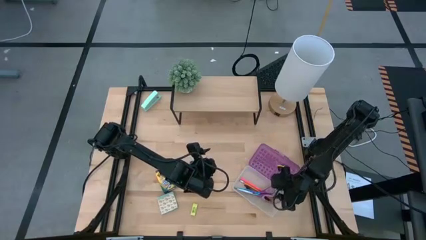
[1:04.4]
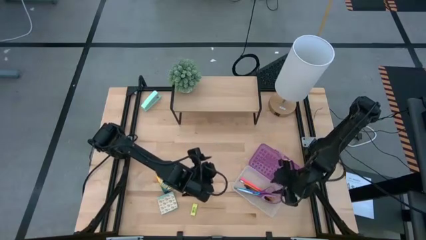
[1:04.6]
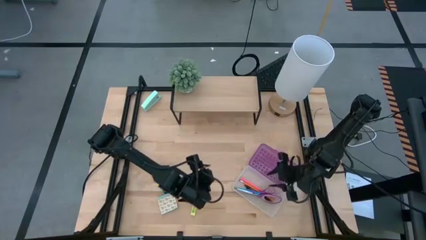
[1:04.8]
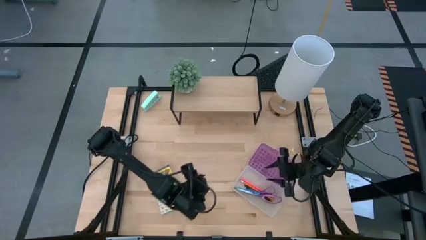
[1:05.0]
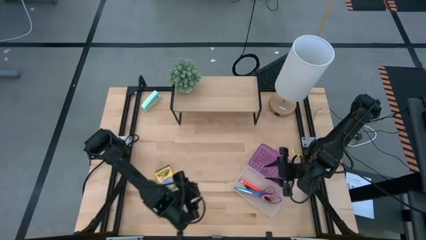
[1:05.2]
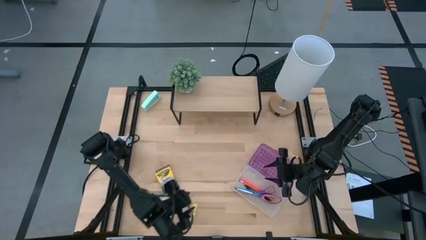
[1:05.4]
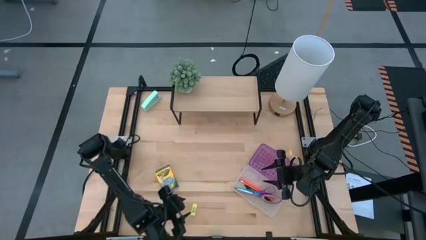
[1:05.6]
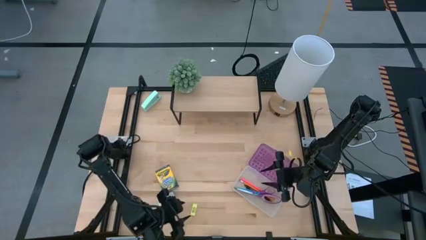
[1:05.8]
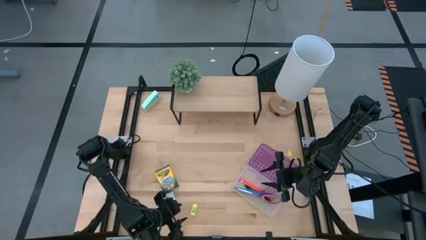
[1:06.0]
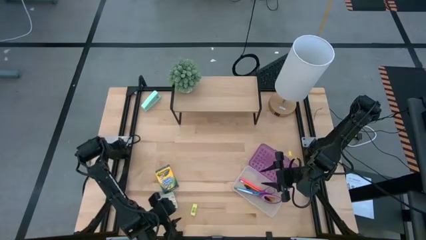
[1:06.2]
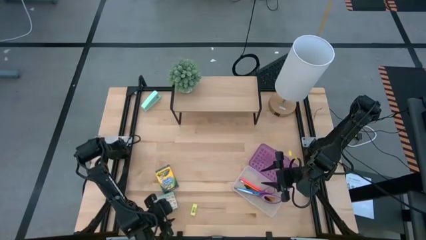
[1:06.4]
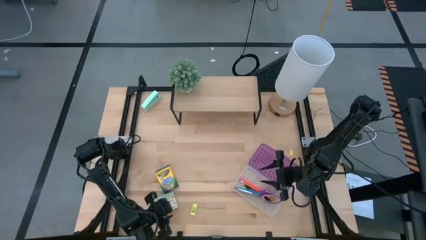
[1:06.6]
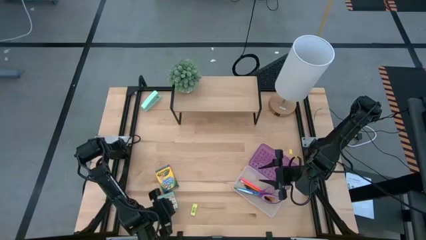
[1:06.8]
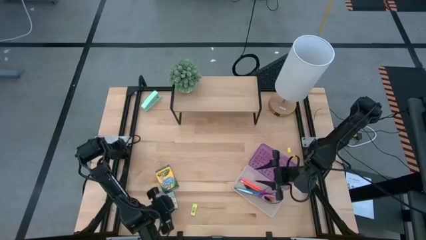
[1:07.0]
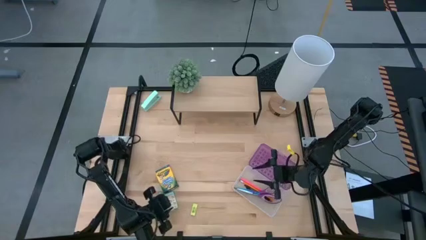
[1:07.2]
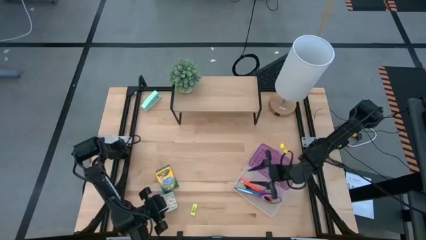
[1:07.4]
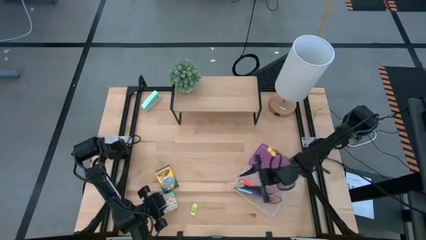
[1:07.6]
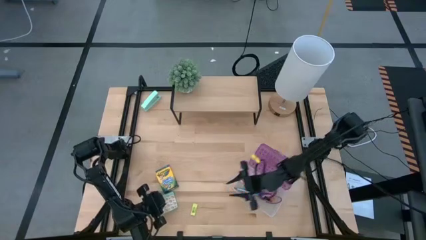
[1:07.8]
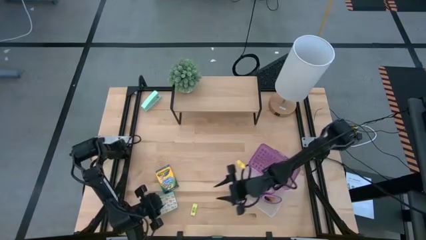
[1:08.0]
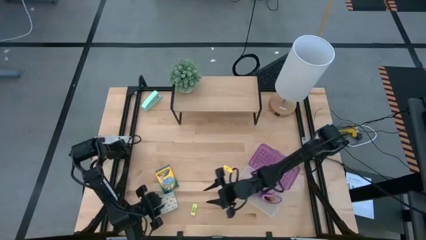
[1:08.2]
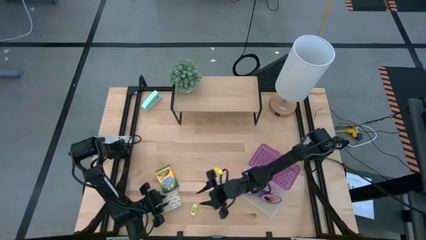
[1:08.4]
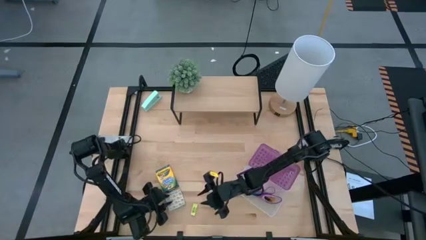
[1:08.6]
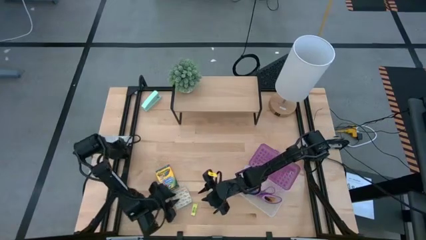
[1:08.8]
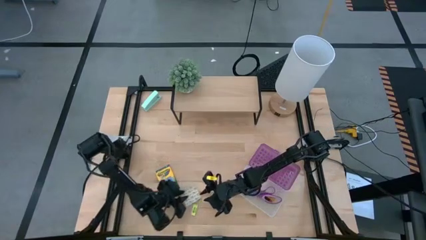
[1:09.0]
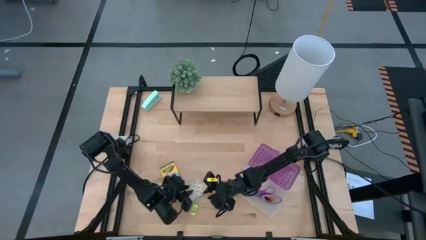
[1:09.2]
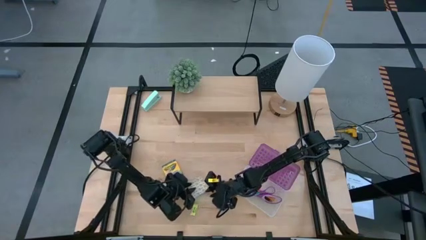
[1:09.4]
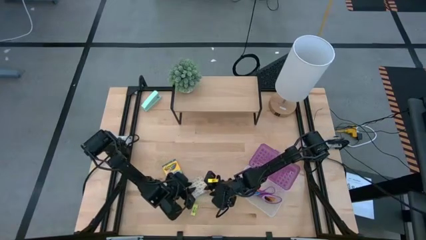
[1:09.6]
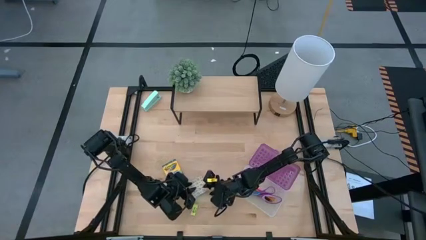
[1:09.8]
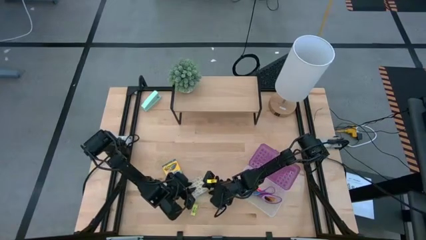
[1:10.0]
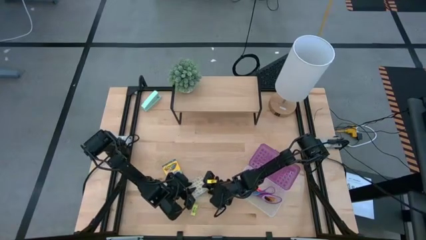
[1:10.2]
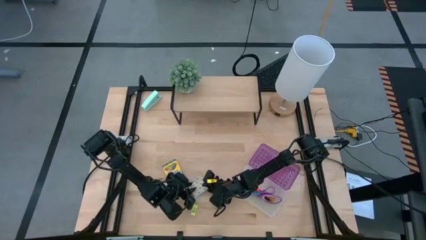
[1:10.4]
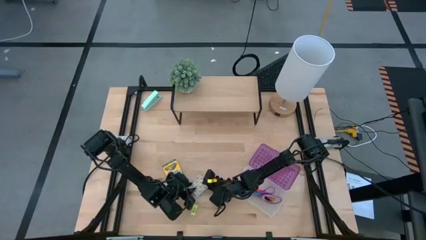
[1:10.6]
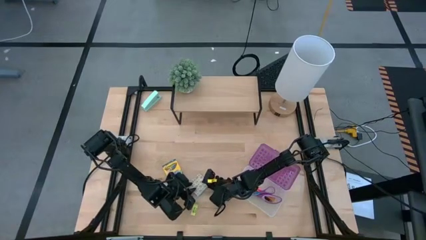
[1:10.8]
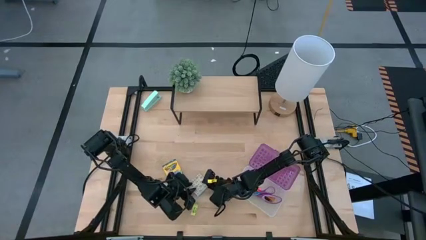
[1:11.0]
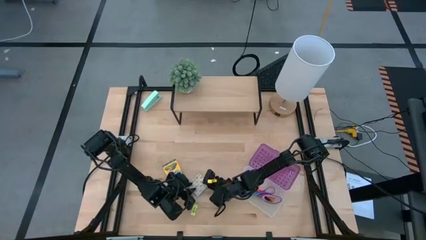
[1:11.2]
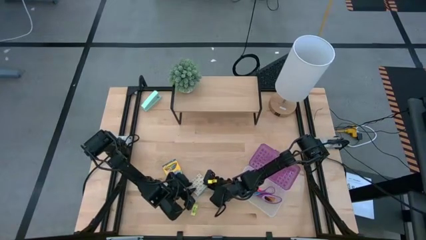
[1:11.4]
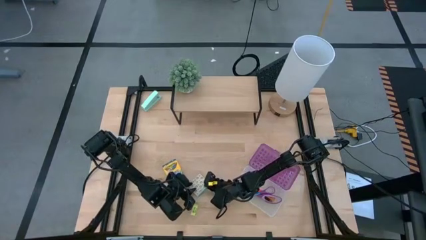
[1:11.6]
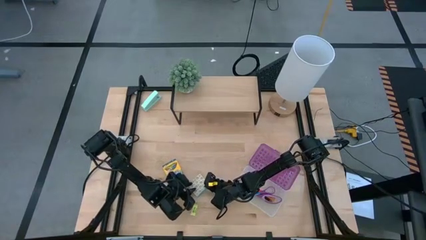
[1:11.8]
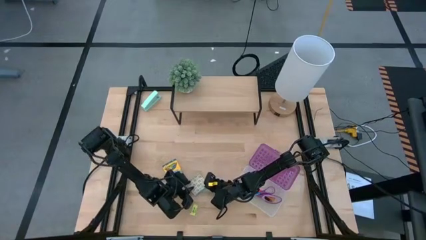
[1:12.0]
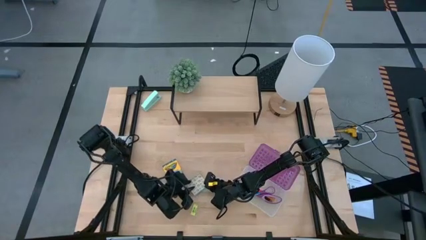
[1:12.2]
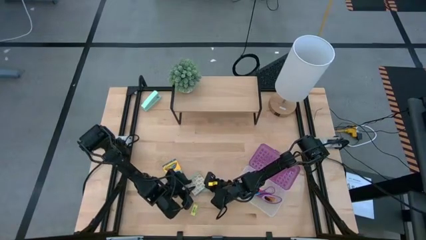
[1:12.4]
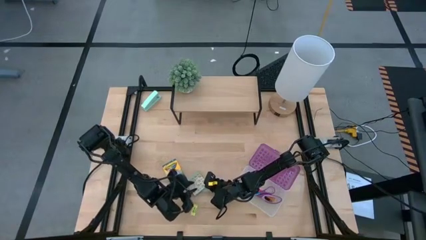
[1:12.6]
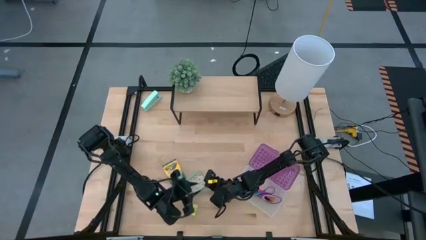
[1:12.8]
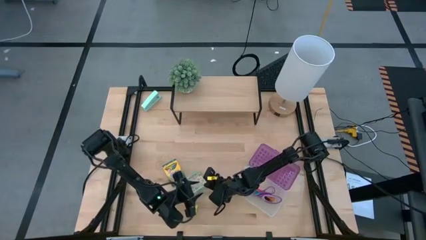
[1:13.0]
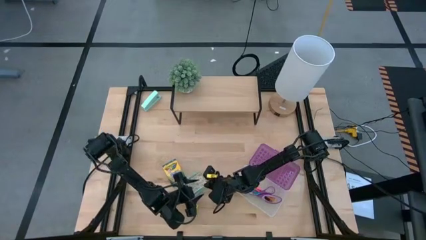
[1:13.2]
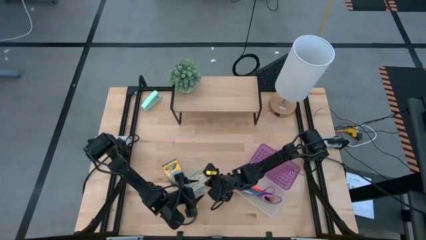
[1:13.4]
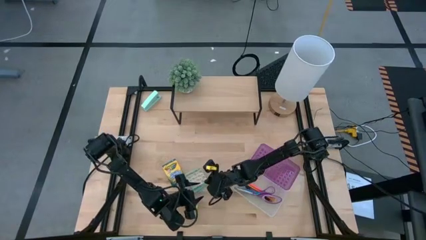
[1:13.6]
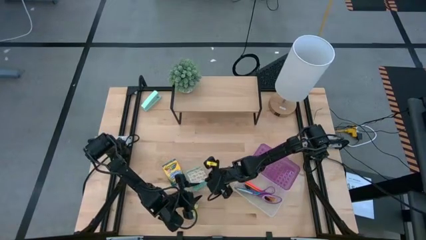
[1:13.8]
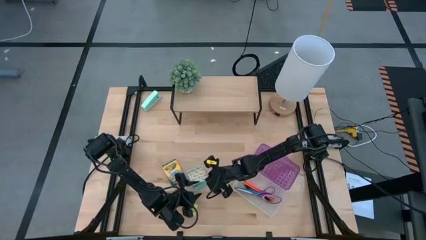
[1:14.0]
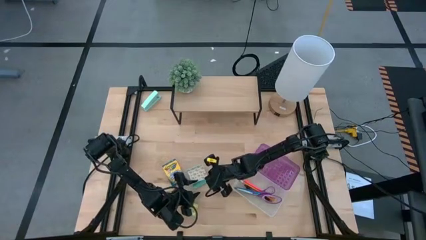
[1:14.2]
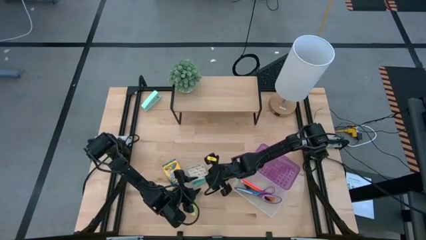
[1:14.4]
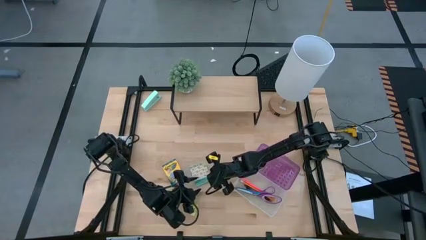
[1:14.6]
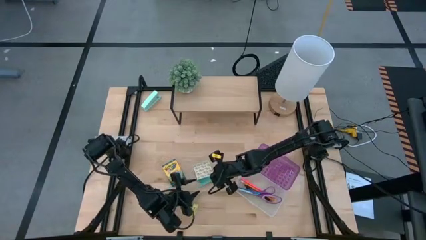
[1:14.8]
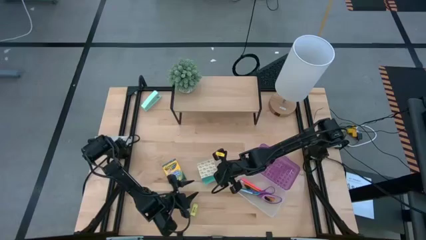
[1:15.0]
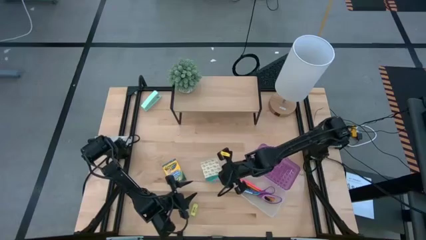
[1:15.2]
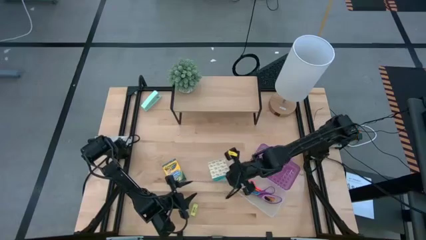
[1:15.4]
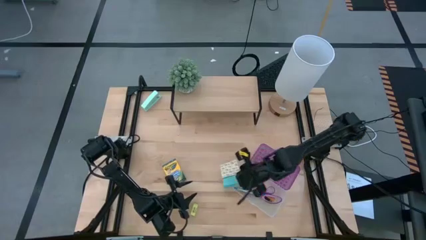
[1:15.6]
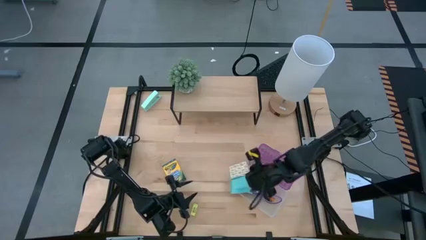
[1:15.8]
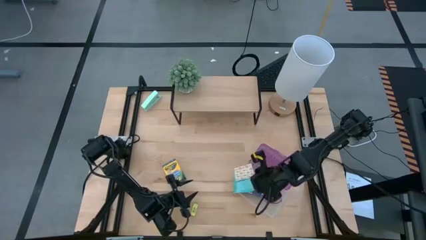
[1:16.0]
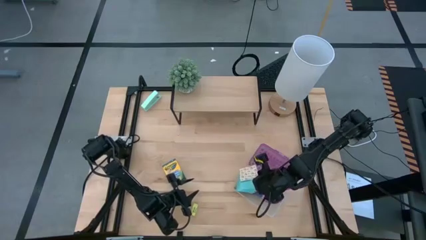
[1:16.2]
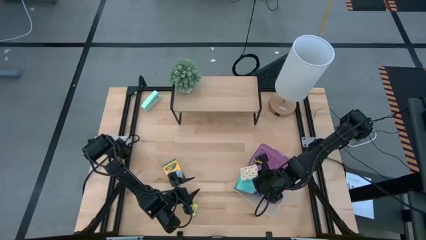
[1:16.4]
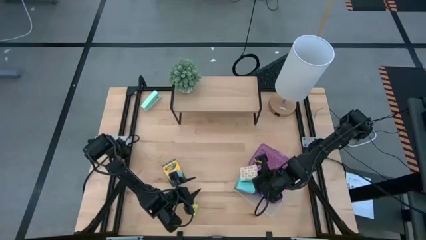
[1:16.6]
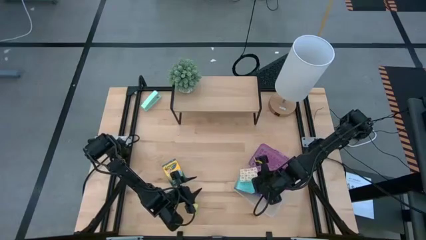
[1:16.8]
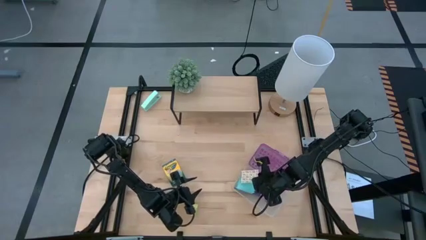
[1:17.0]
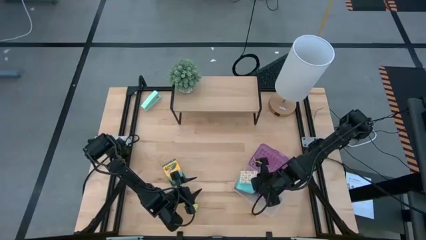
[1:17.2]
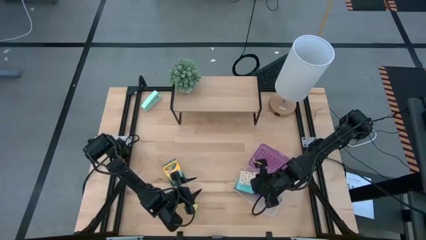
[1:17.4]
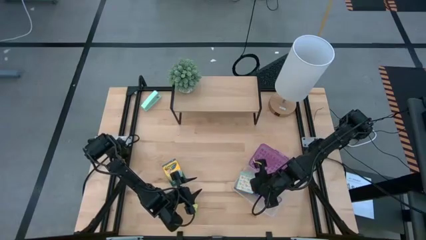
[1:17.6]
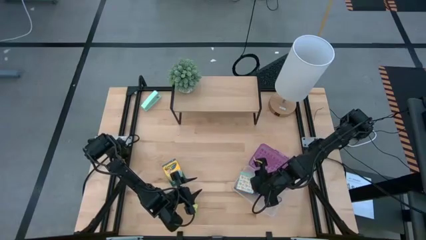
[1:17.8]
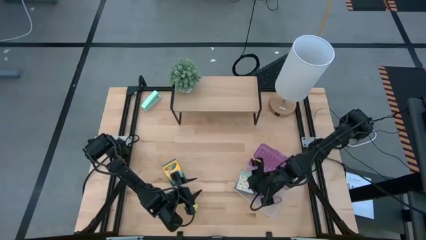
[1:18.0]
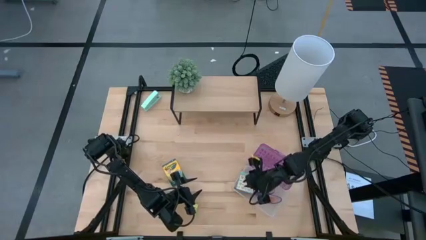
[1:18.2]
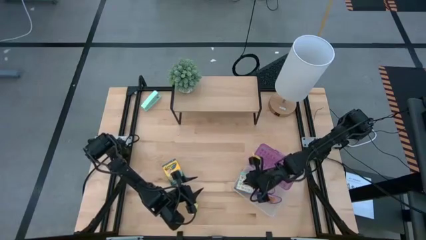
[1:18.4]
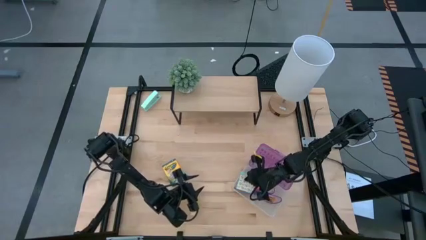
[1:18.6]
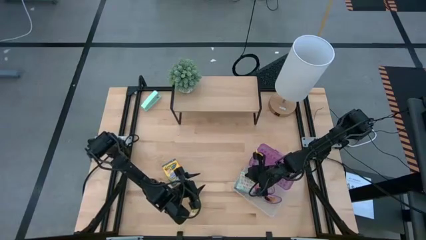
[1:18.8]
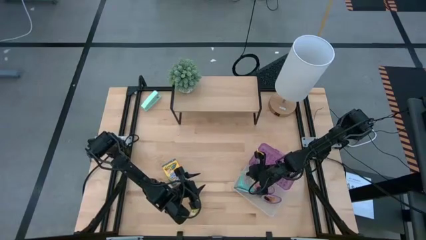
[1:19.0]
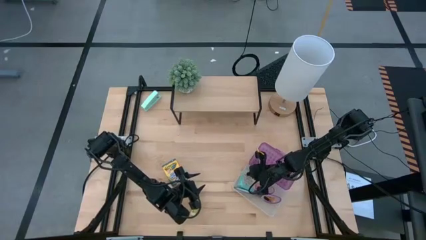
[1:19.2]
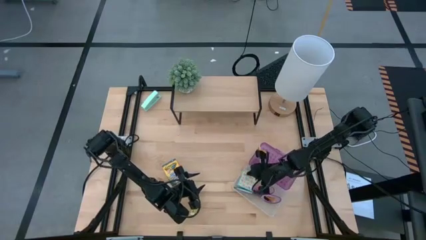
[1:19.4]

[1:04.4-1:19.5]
Task: Pack school essentials
Put the blue sticky notes into the purple supply box
